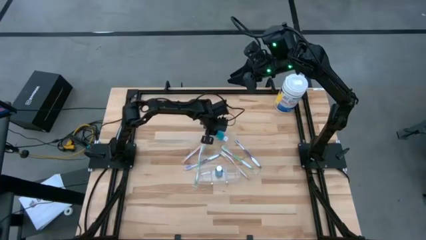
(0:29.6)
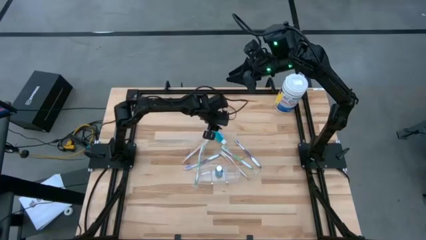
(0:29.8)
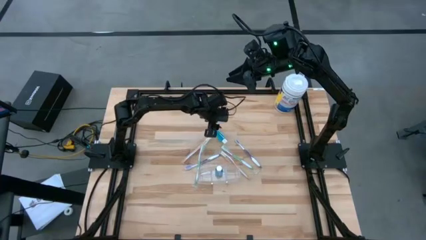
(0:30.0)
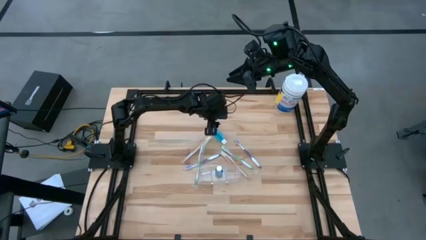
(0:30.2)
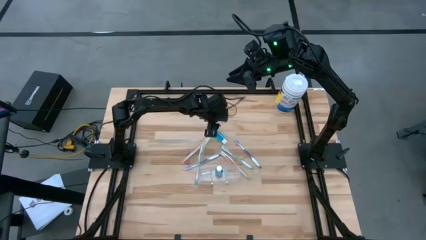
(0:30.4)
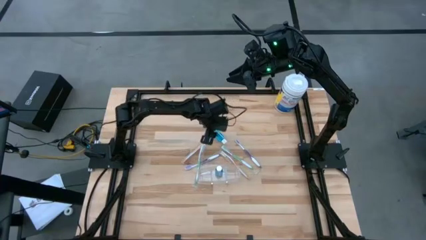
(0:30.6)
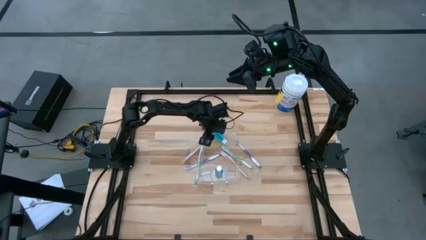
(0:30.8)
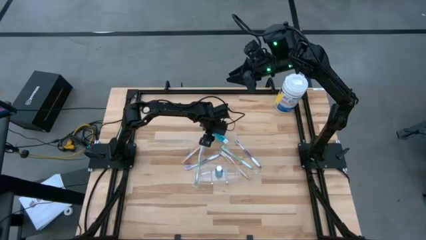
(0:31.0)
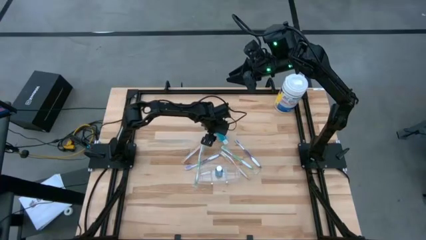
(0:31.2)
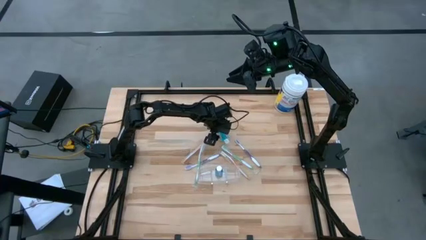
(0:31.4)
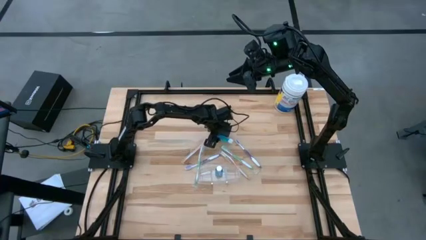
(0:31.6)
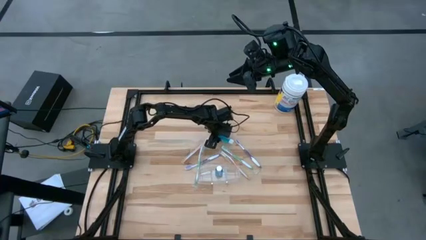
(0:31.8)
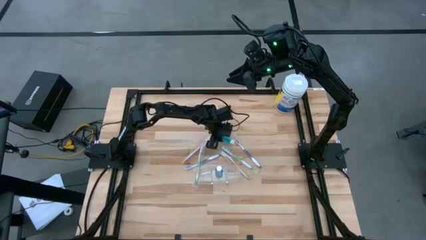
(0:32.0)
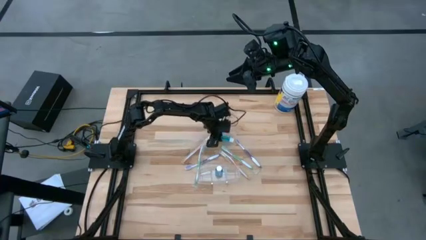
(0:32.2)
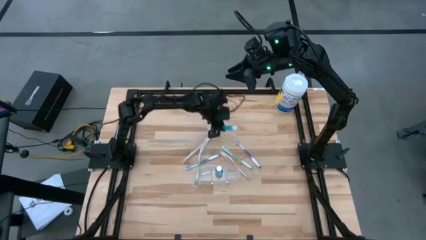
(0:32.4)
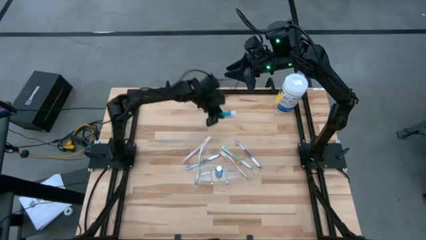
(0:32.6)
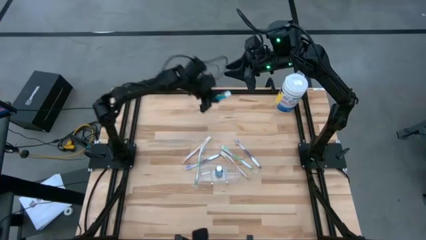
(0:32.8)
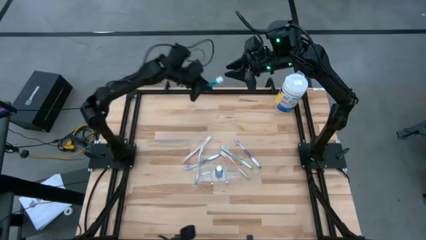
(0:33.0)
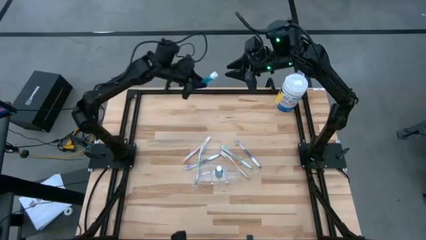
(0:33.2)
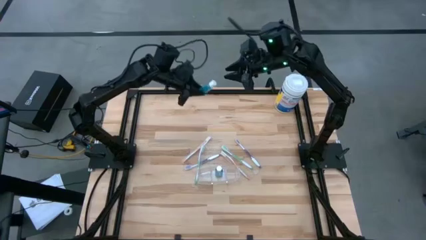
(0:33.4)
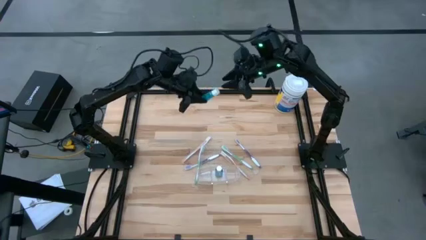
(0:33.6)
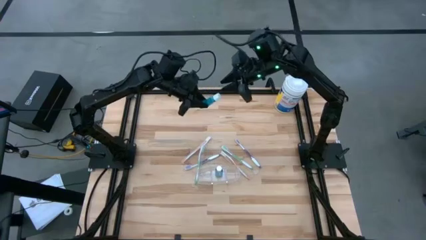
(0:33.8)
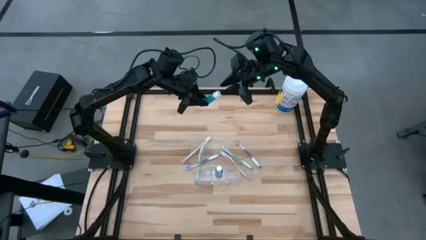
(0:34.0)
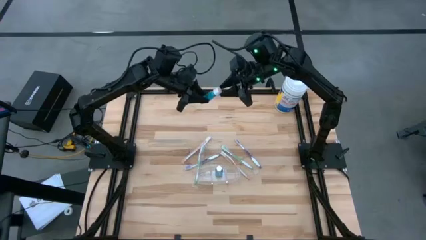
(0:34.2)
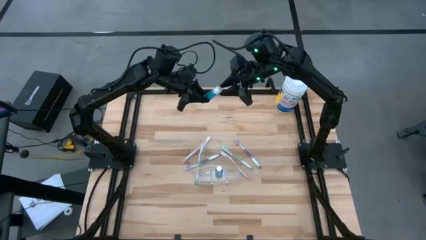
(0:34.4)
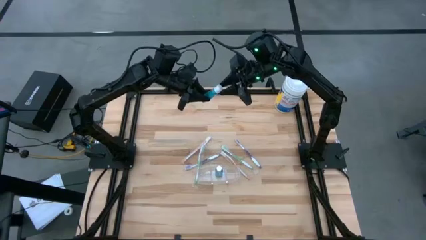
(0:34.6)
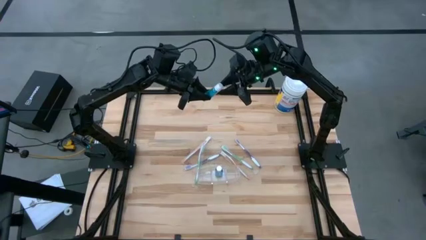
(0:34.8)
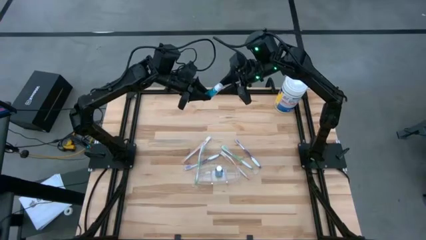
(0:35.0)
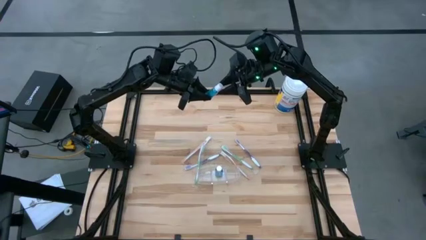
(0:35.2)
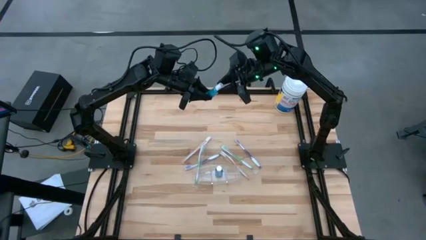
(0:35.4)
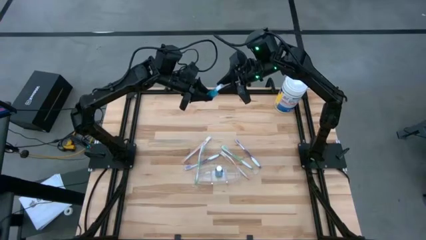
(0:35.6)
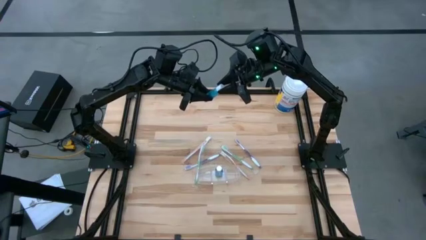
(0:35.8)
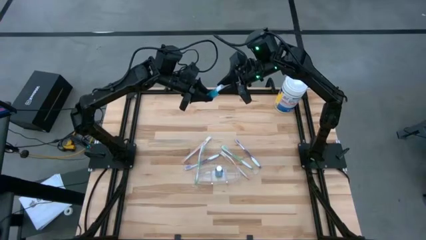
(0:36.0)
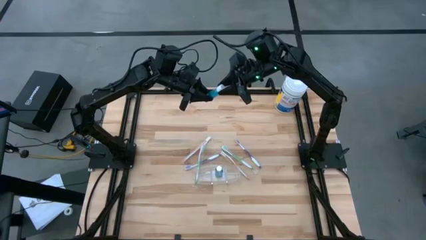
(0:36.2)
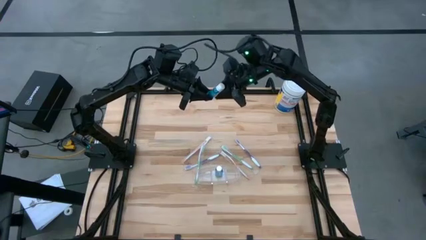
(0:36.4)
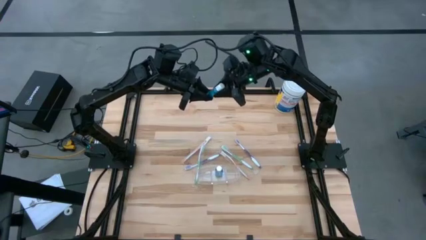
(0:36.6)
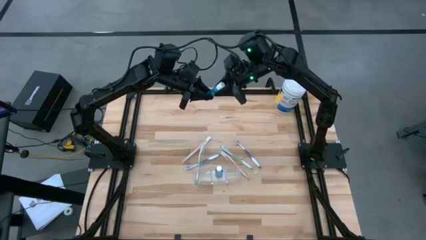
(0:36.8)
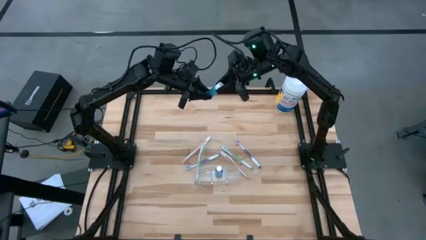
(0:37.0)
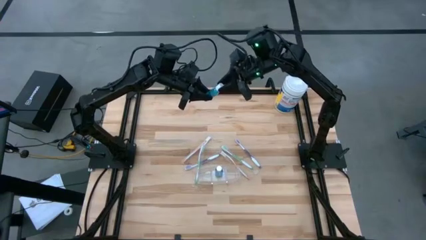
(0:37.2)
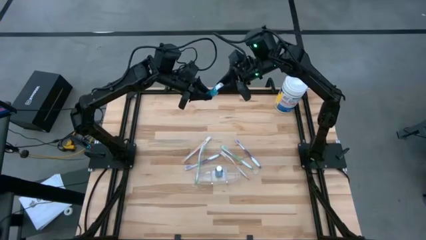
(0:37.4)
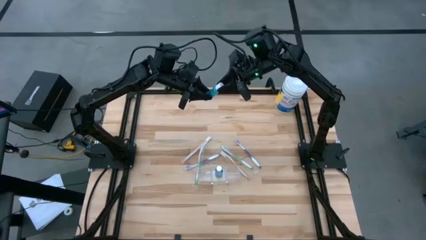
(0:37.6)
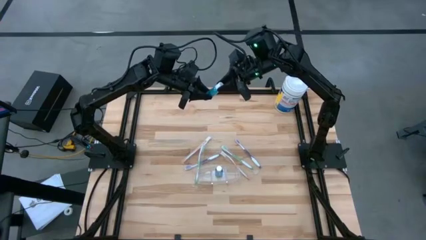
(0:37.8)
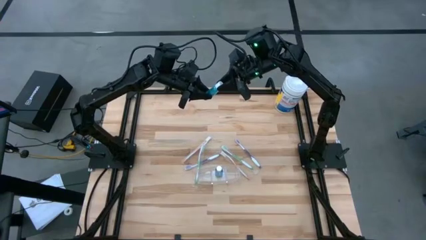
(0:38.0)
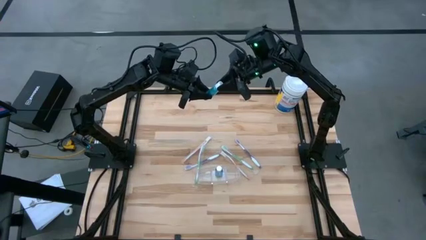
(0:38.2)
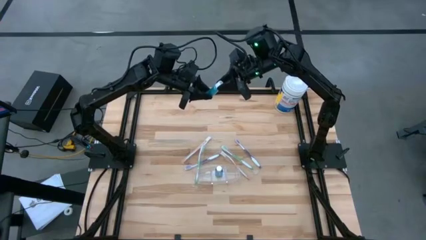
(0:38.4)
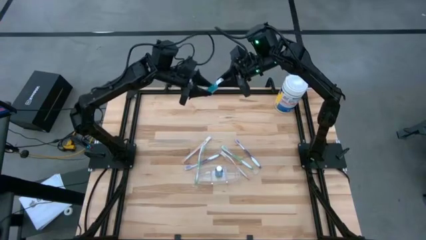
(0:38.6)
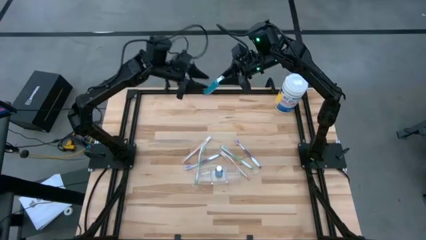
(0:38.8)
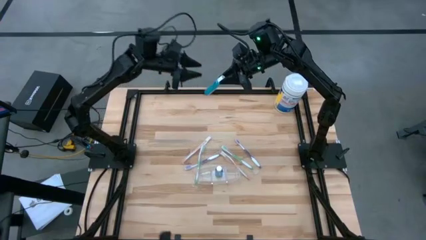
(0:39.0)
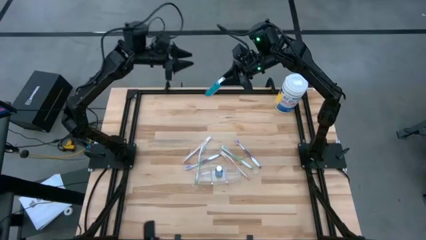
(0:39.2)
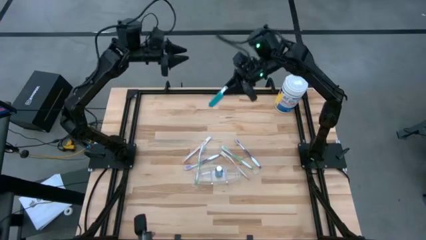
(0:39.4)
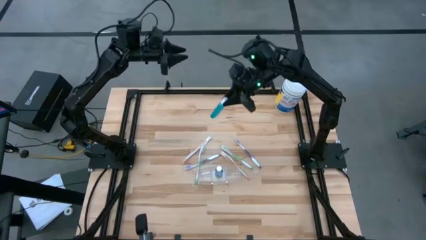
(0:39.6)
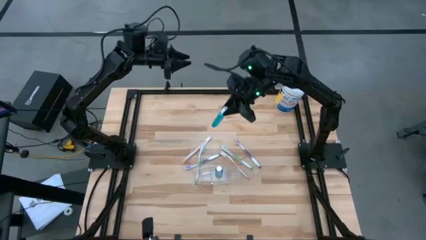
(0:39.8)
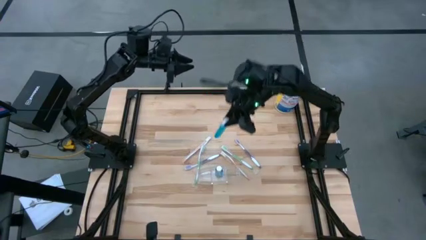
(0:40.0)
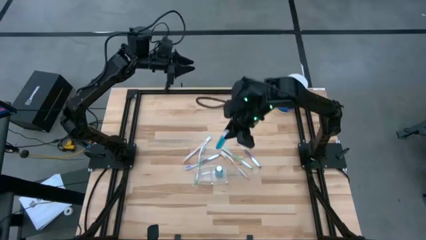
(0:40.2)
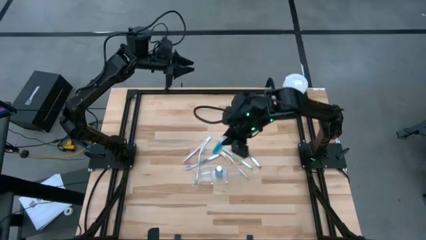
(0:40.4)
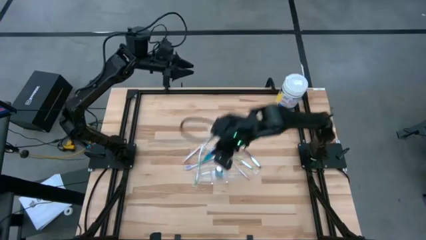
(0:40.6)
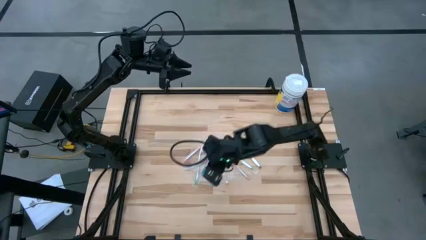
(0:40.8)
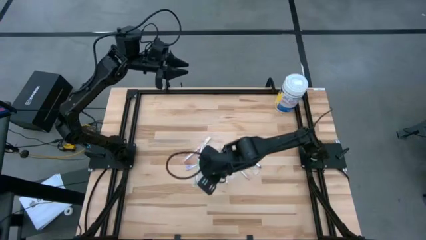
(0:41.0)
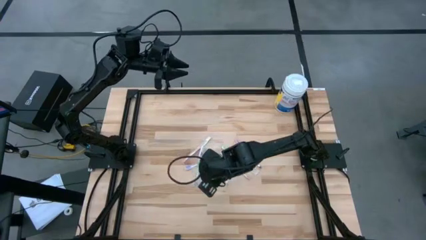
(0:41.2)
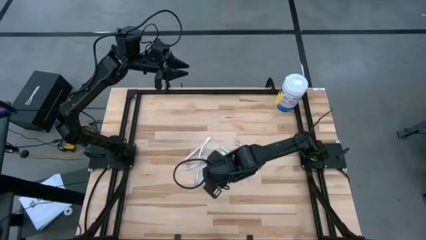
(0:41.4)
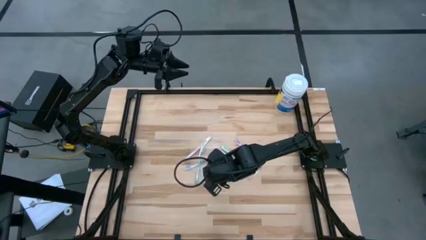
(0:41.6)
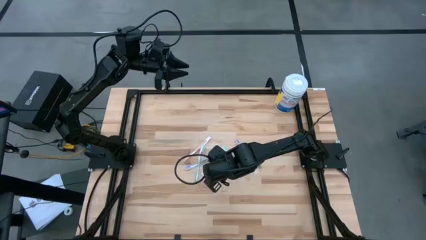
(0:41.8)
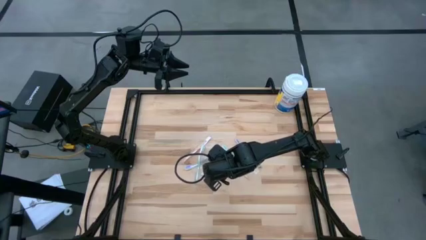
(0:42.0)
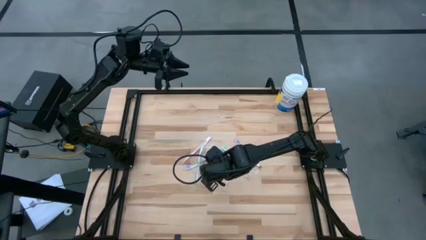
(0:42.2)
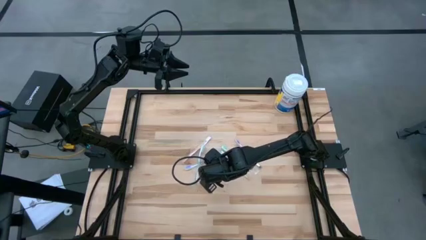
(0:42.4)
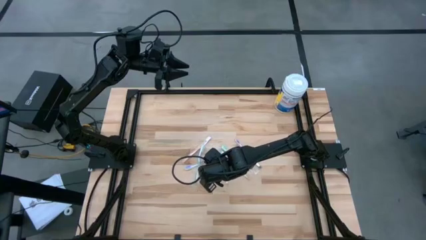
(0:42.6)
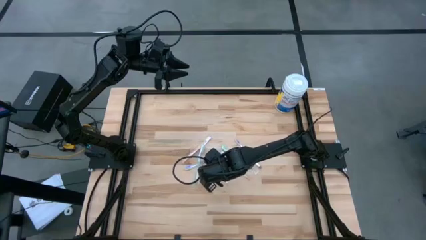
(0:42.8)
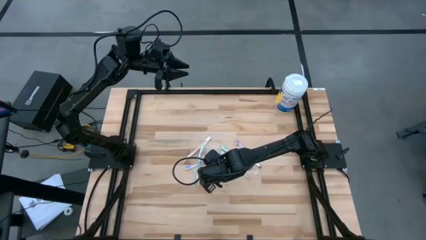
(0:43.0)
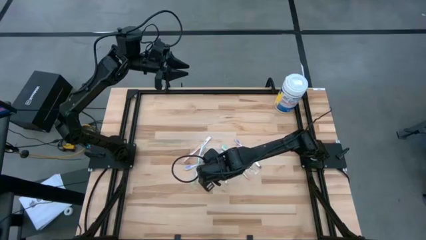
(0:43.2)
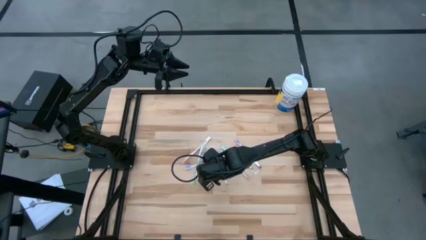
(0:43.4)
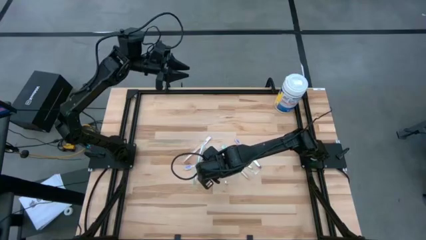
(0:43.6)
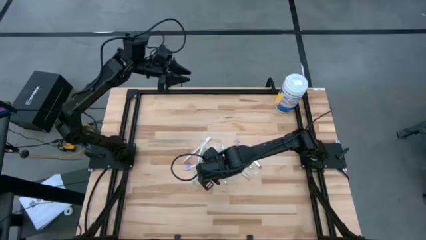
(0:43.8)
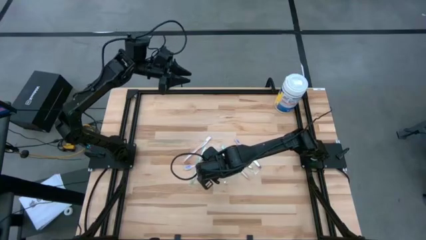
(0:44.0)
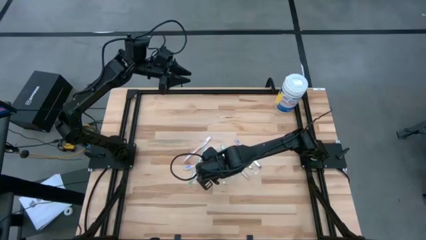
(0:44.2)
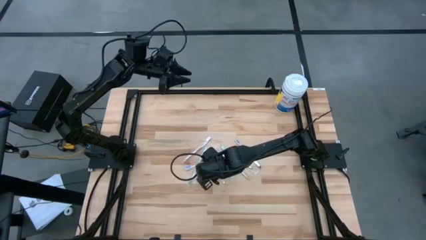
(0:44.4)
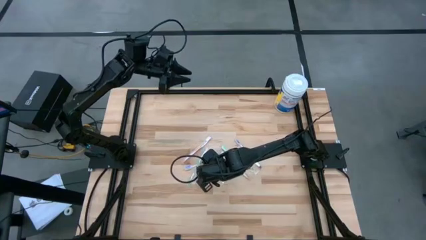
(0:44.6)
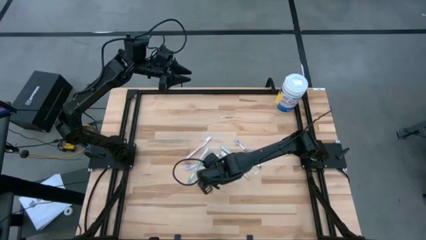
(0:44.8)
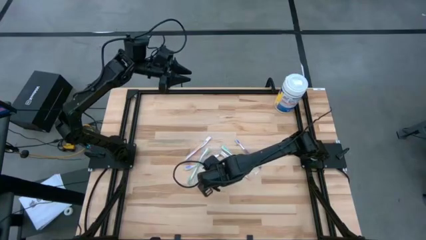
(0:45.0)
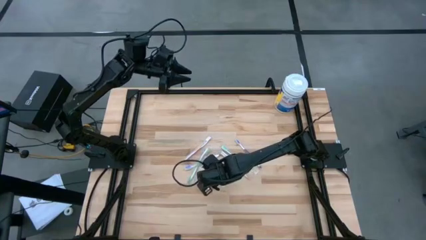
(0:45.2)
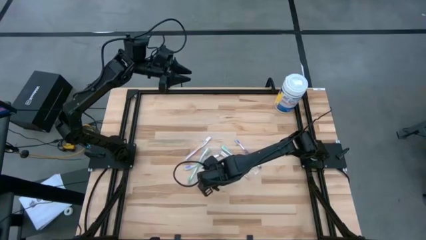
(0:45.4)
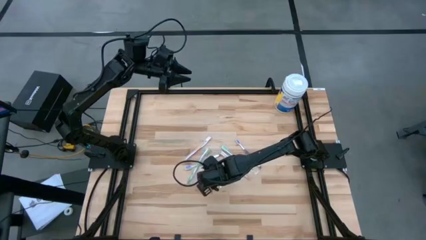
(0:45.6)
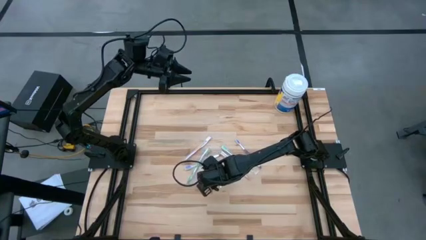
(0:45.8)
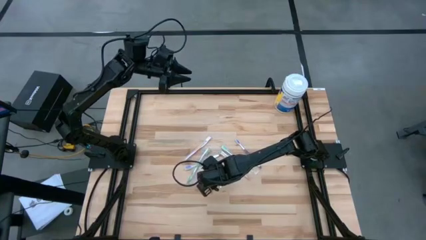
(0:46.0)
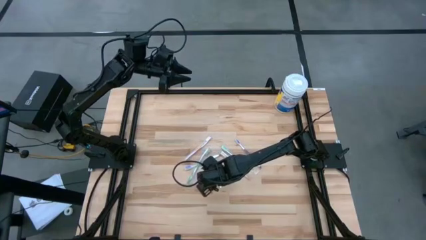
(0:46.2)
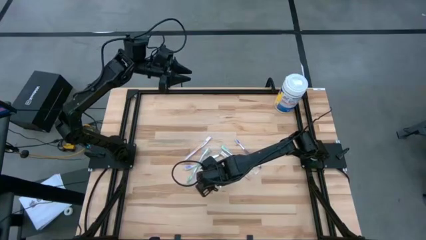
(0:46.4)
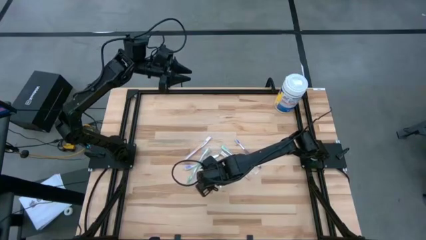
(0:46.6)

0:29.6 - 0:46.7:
Task: Pick & Place toothbrushing station
Put the blue mouthwash into the transparent organizer
